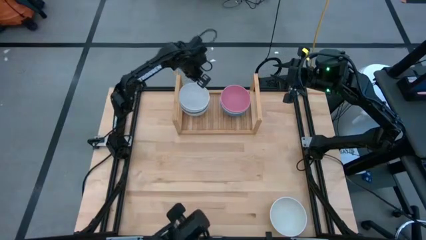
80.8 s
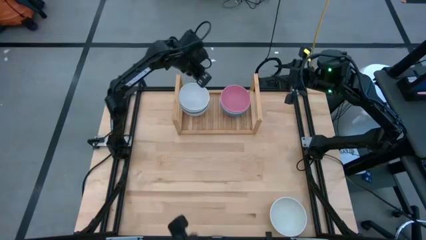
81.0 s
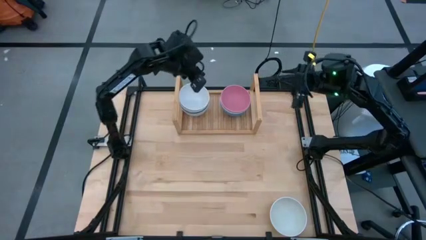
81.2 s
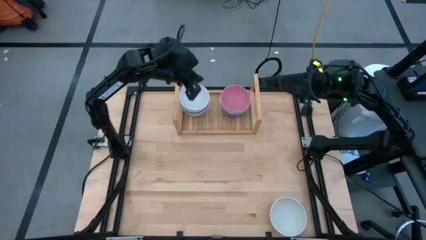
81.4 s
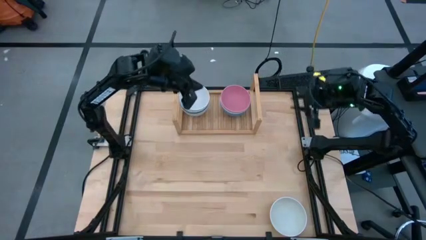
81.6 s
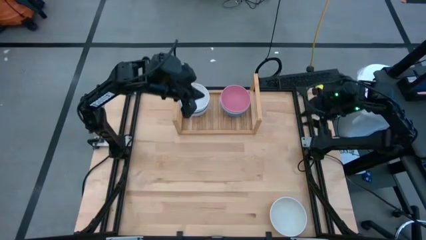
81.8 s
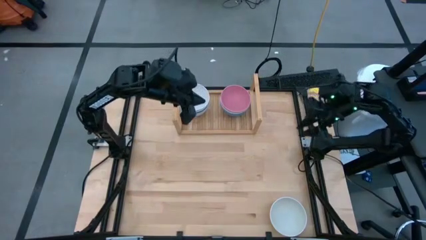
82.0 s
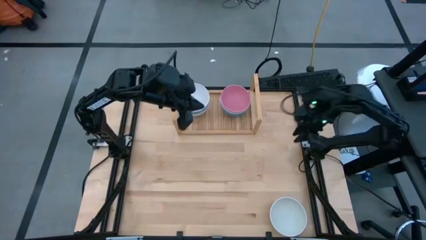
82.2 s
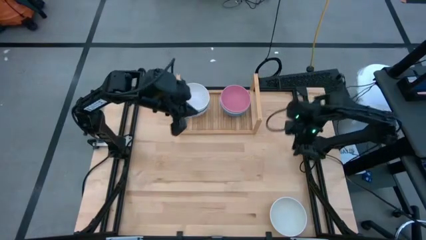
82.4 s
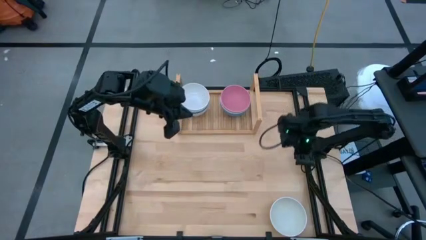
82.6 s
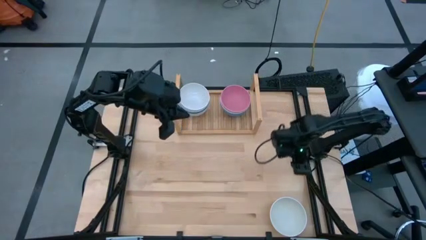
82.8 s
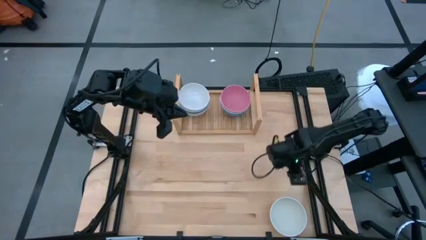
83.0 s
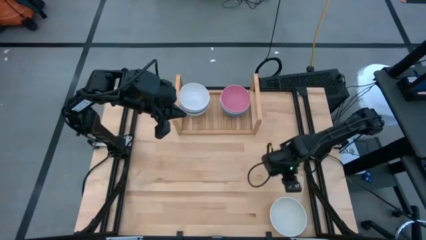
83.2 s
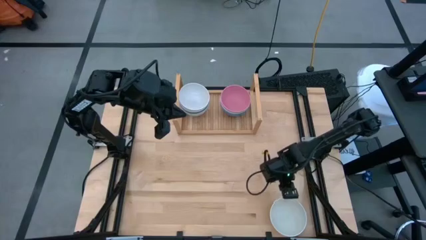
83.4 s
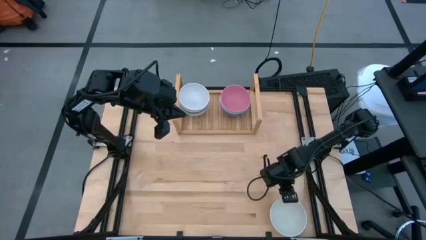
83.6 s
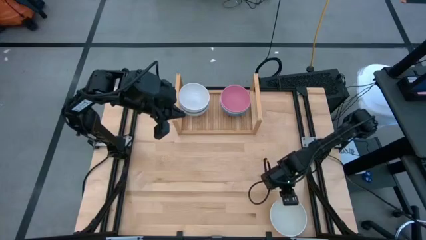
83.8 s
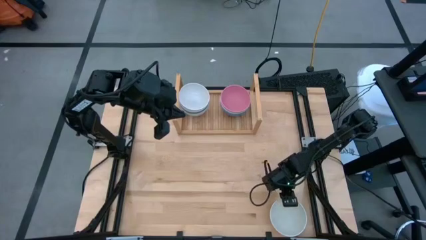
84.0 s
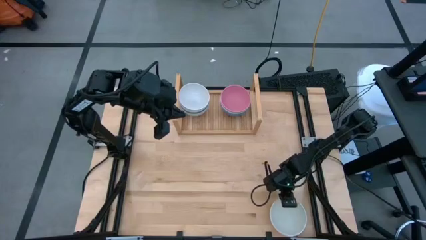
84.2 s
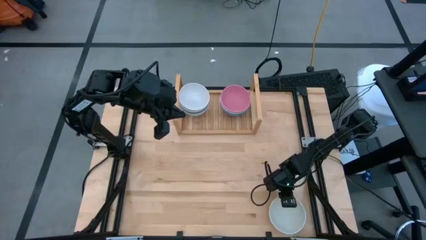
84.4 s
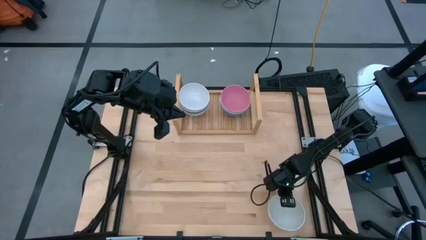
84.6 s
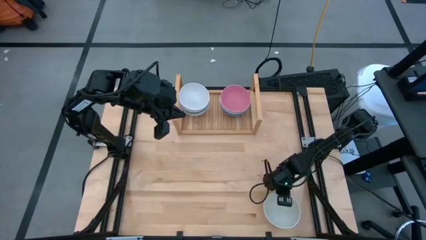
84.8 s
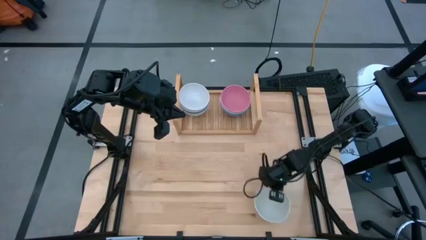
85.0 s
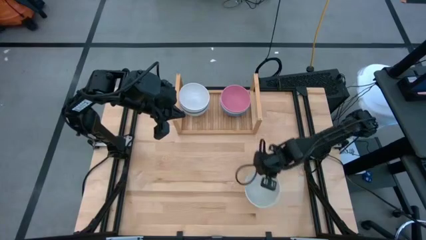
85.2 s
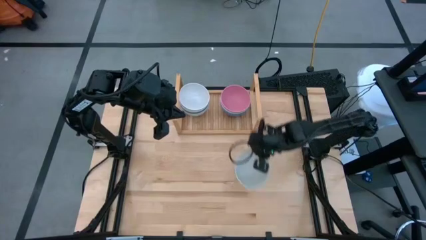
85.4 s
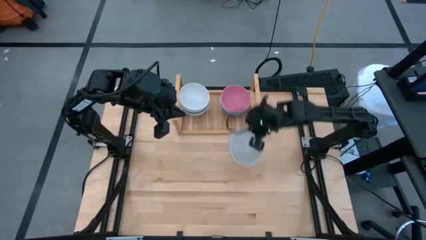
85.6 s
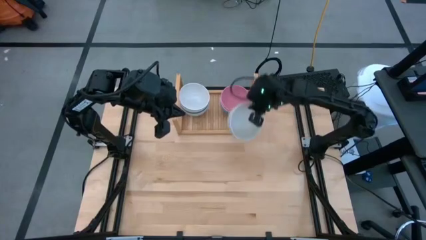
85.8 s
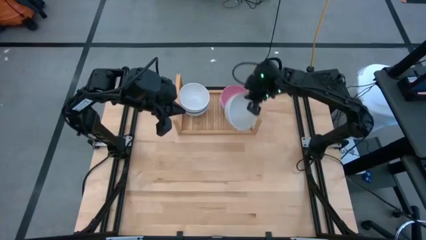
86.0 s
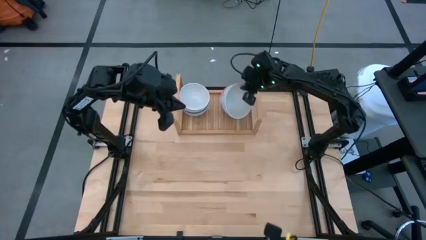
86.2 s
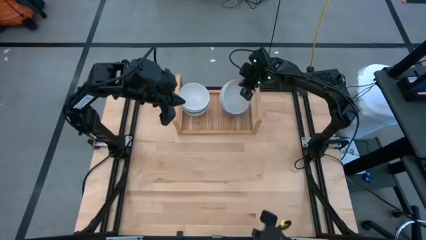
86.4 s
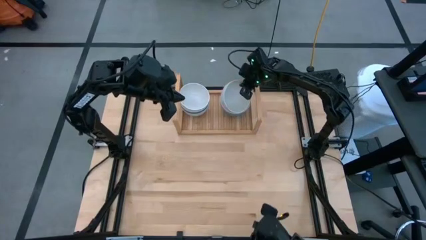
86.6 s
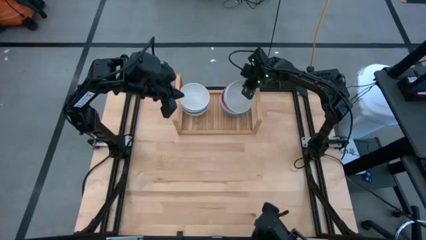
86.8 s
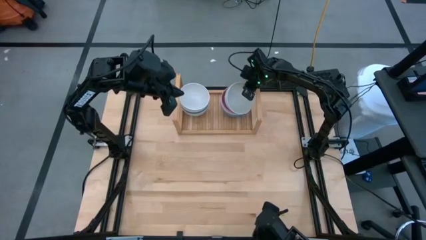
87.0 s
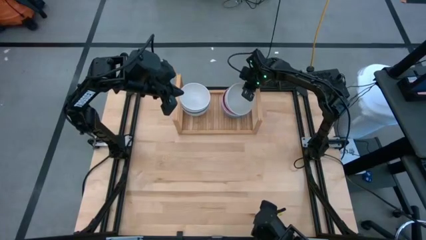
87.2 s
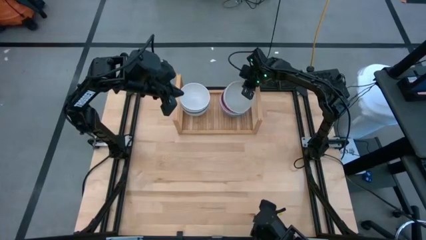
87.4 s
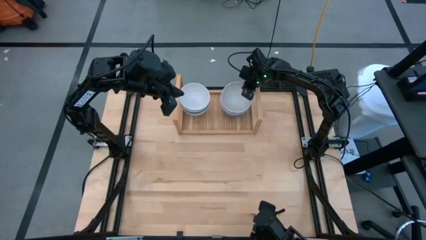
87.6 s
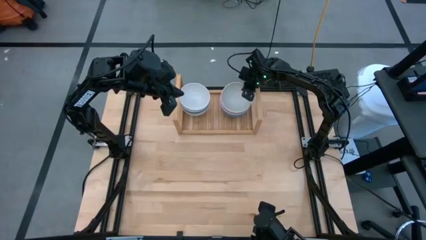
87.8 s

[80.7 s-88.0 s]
Task: Place and stack bowls onto a shelf
Stack the white bowl on top of the pink bowl on the shelf

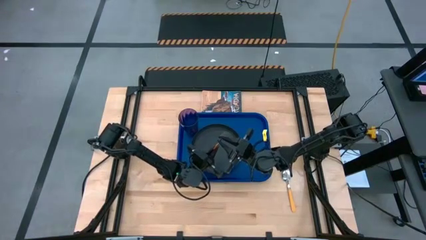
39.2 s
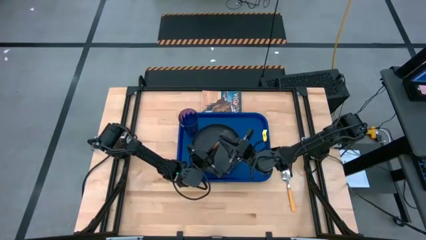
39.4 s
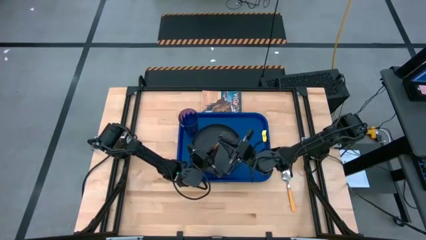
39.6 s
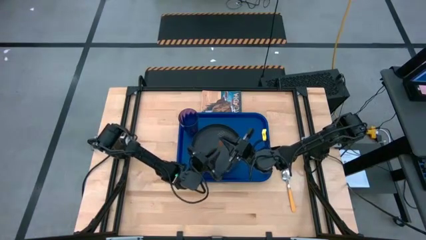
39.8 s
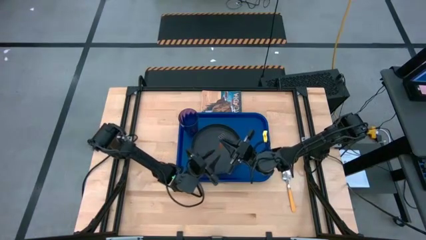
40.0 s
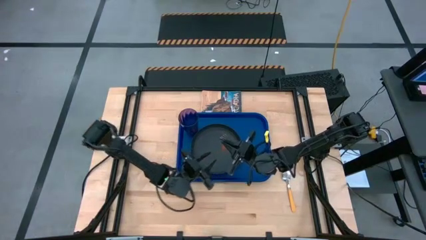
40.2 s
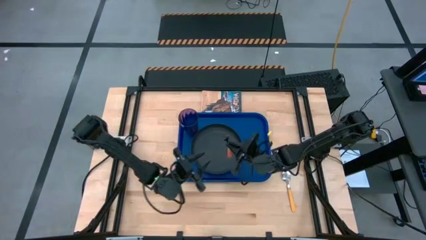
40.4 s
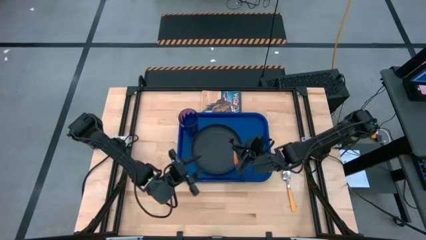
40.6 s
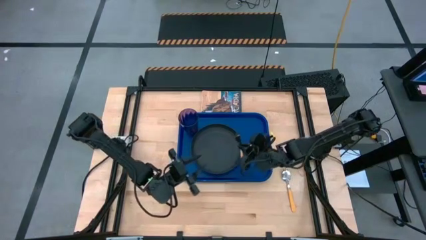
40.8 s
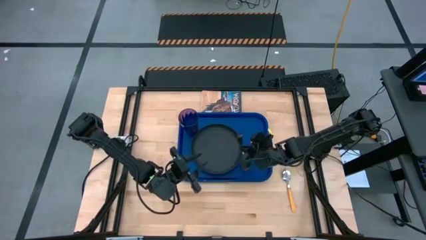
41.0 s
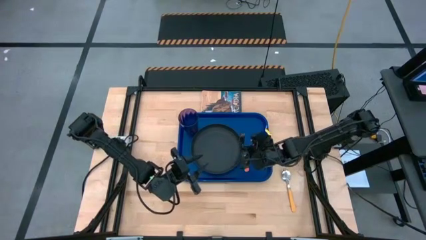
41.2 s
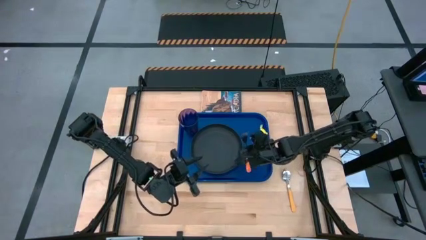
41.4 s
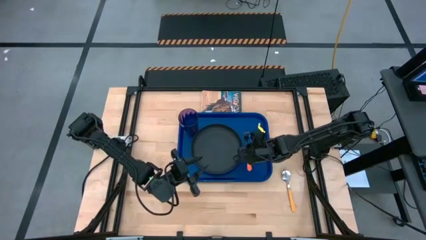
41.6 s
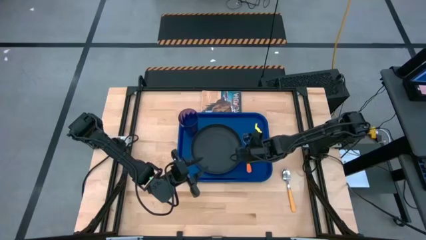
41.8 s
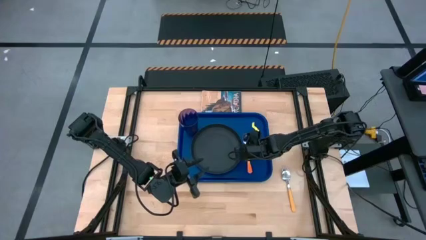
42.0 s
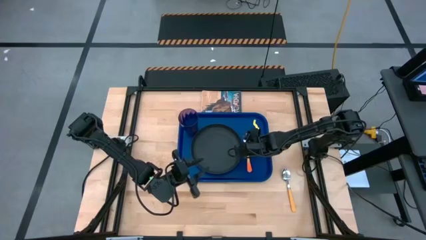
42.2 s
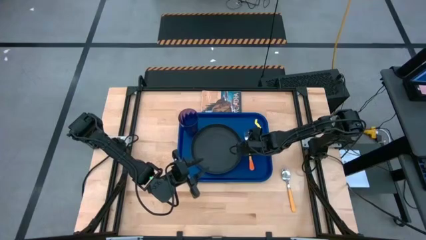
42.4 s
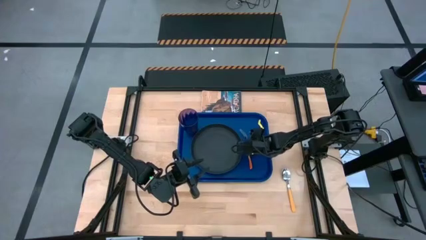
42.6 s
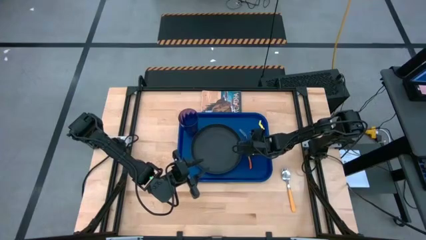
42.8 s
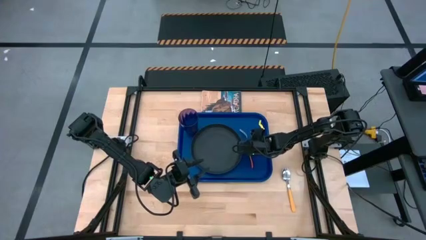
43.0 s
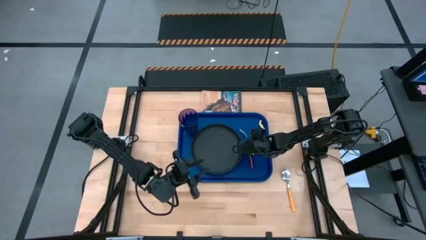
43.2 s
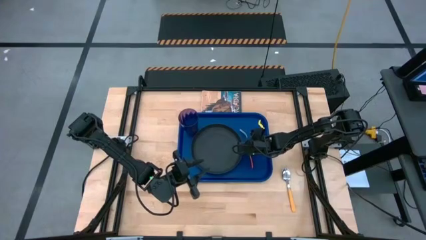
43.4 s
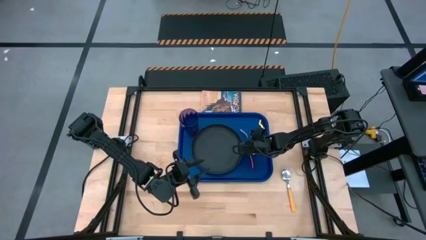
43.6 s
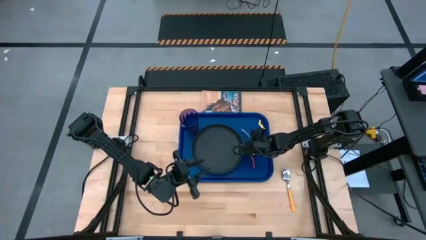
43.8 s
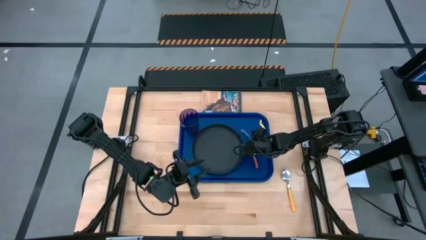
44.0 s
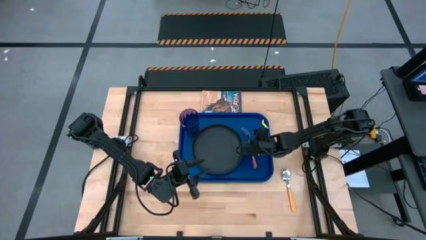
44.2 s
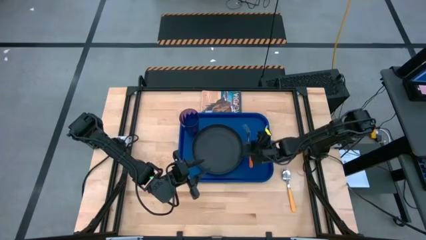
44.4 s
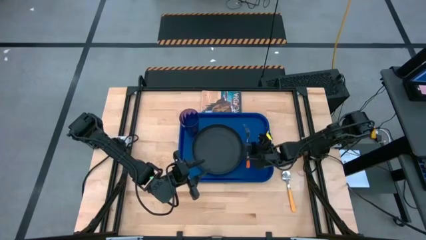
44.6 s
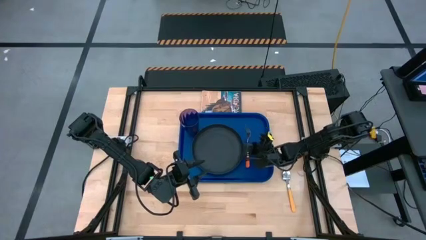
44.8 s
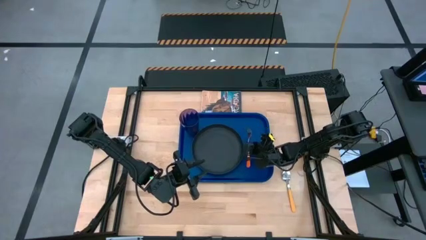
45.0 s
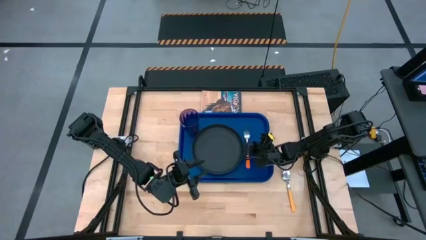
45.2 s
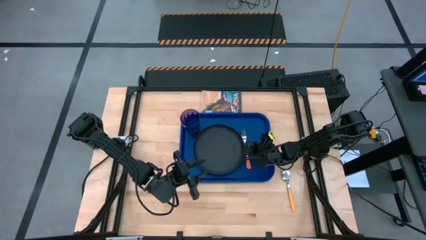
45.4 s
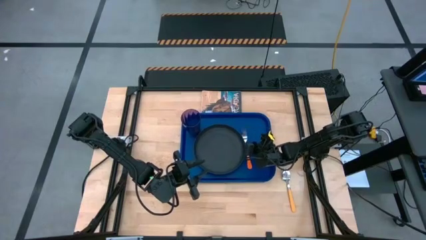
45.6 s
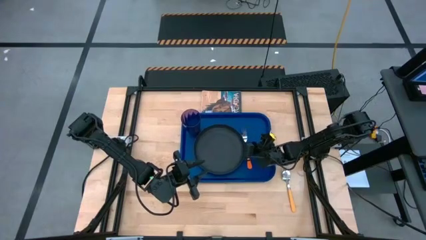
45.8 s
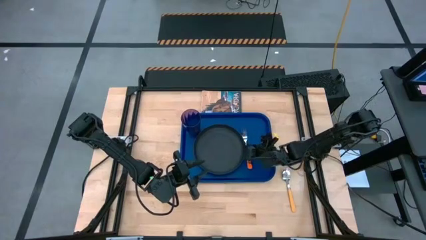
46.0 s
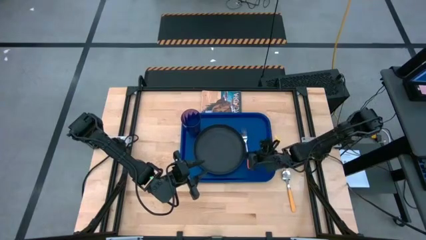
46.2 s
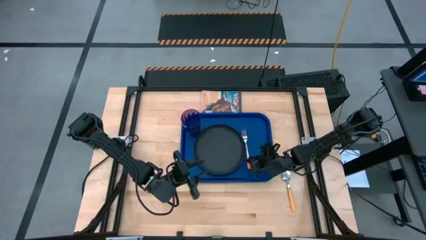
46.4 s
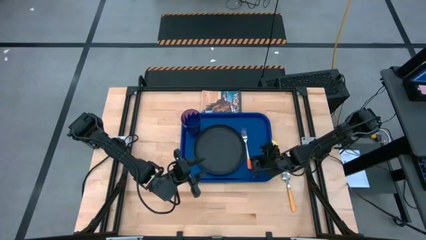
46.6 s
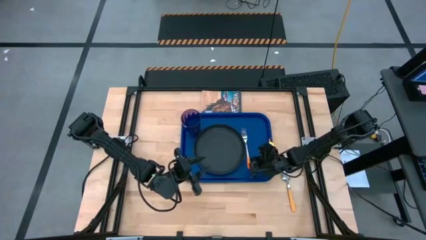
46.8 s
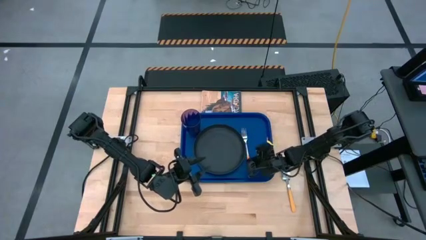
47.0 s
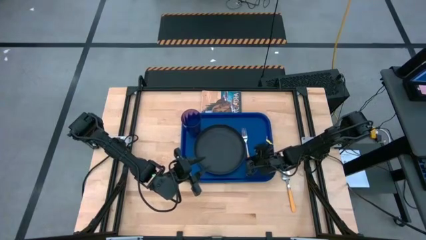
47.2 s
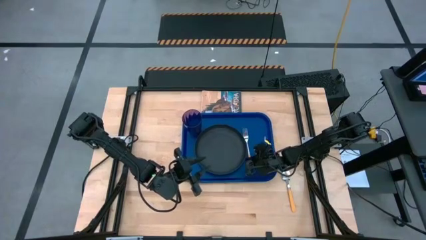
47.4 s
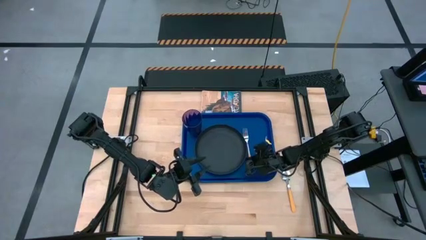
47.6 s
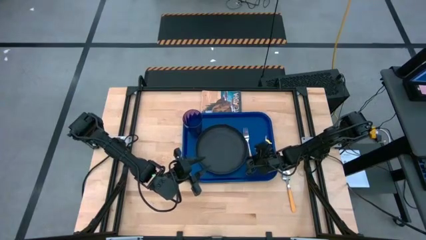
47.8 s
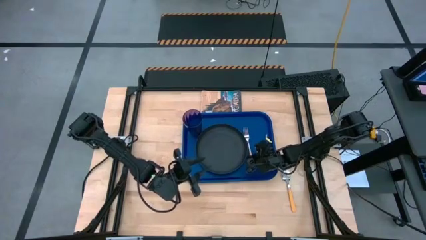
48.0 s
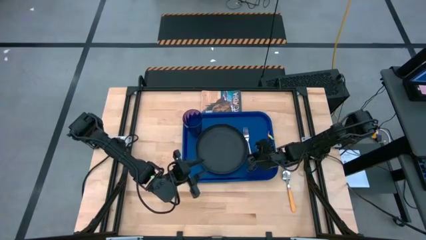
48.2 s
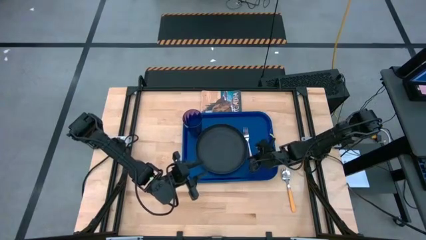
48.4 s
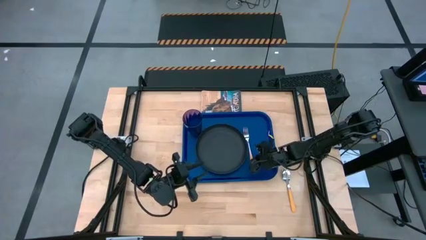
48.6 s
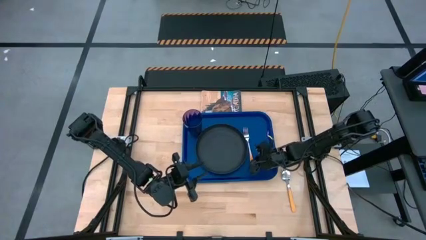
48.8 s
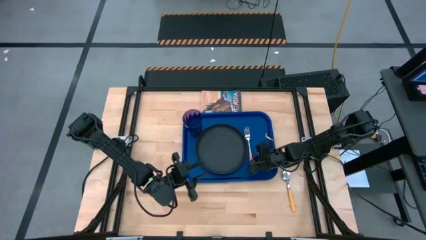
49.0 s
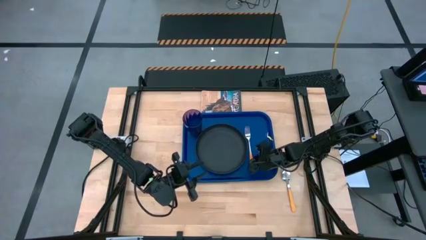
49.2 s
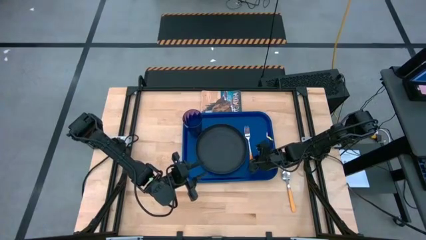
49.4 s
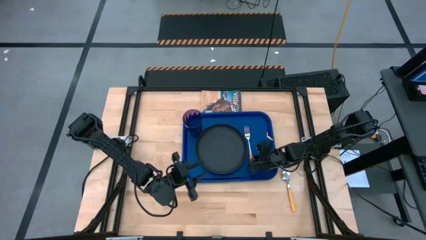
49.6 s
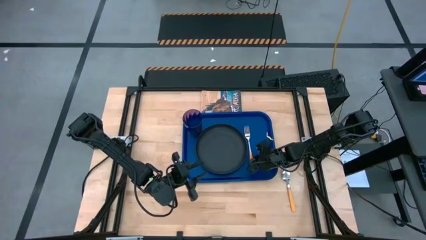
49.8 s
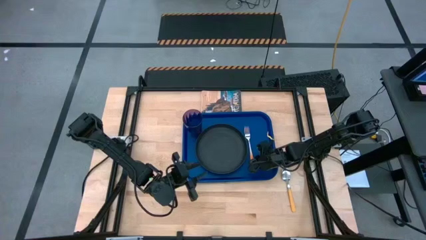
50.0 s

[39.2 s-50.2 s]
Task: Pick and place plate/cup/fork/spoon on tray
Put the orange fork on the blue serving tray to the right of the black black plate
